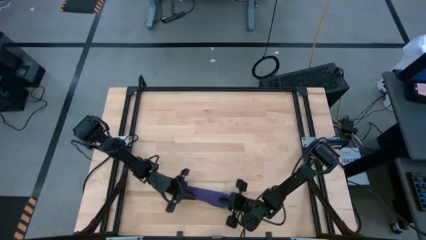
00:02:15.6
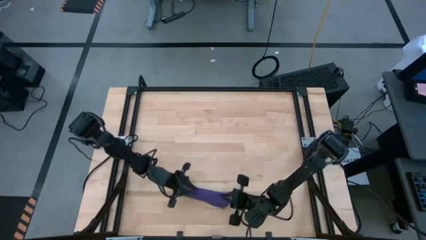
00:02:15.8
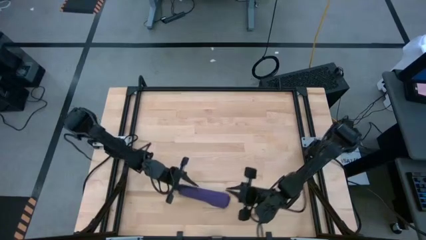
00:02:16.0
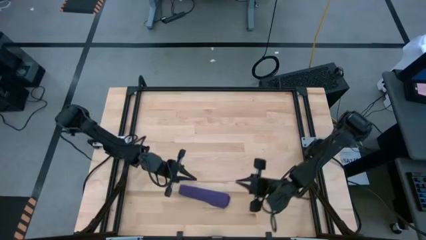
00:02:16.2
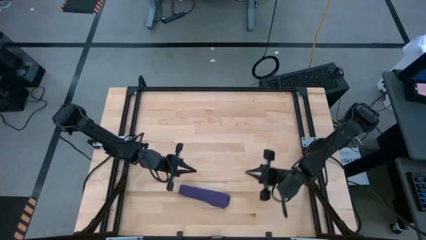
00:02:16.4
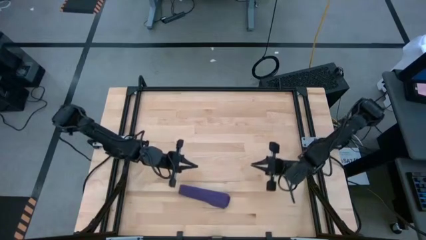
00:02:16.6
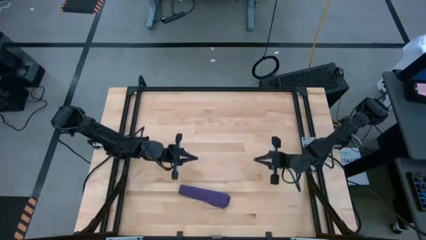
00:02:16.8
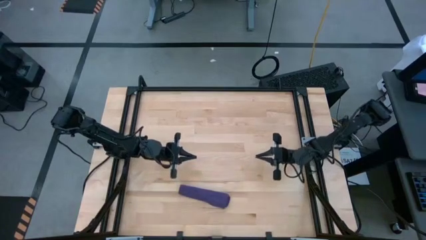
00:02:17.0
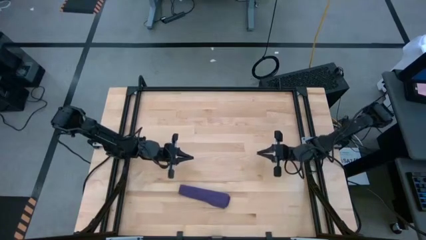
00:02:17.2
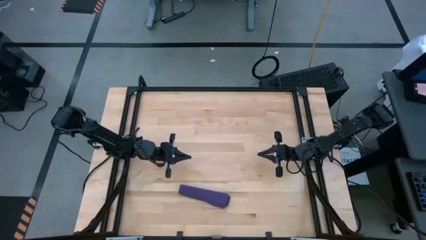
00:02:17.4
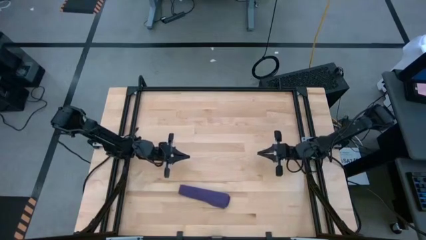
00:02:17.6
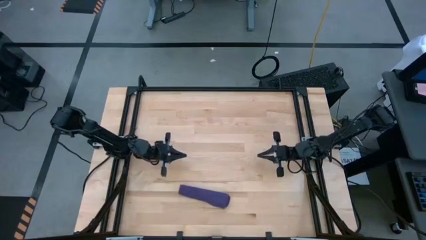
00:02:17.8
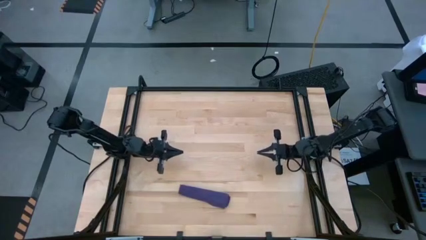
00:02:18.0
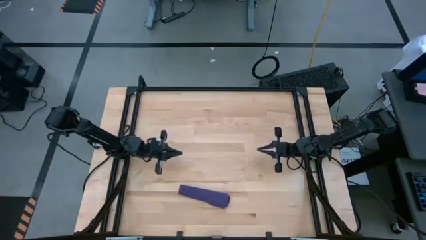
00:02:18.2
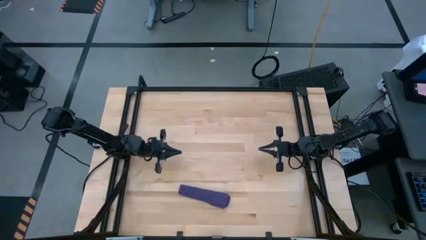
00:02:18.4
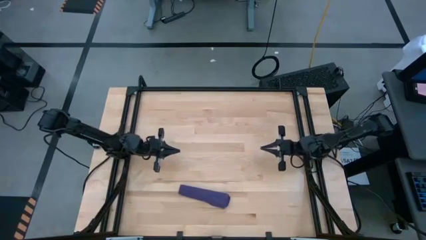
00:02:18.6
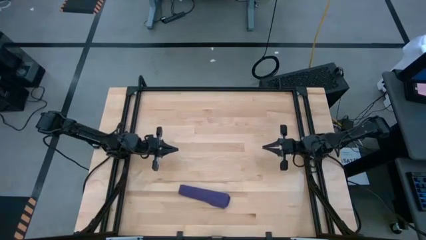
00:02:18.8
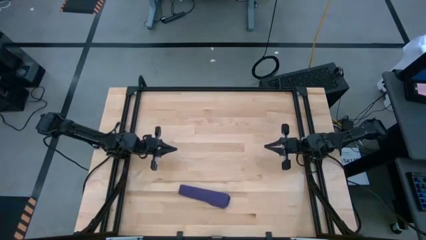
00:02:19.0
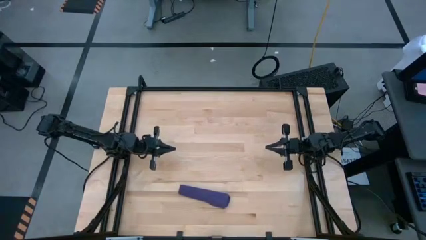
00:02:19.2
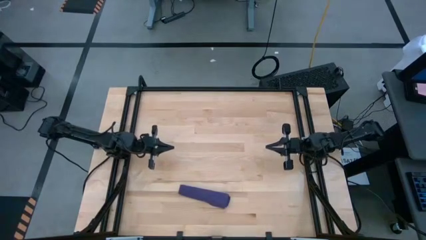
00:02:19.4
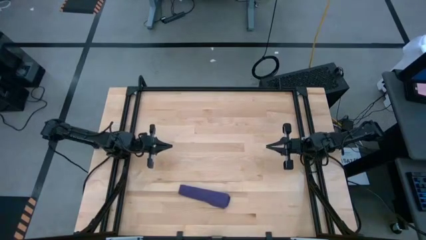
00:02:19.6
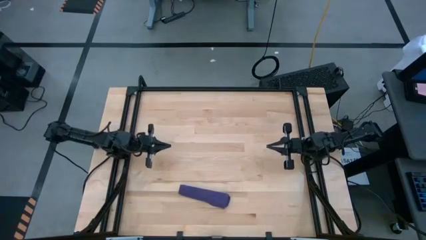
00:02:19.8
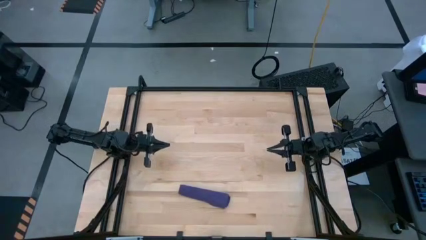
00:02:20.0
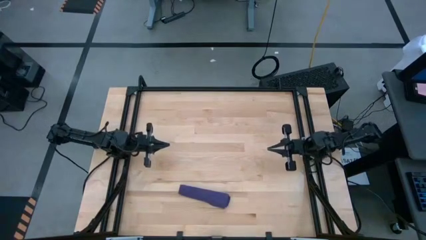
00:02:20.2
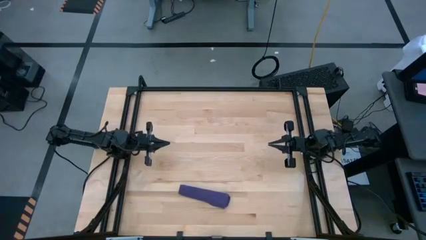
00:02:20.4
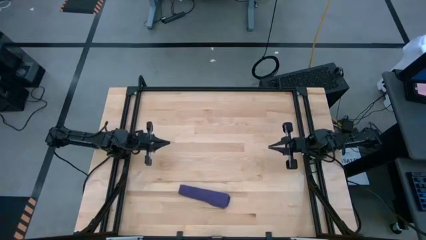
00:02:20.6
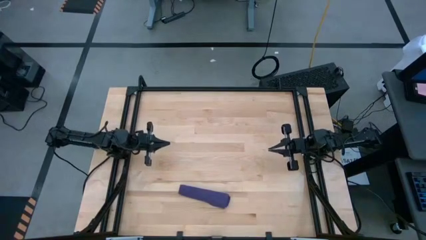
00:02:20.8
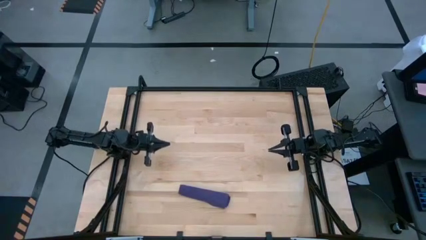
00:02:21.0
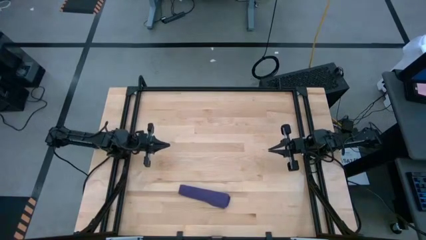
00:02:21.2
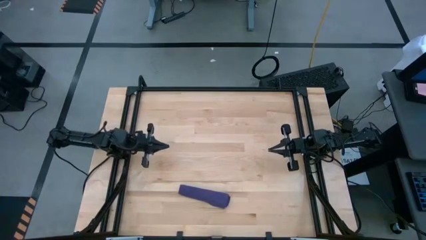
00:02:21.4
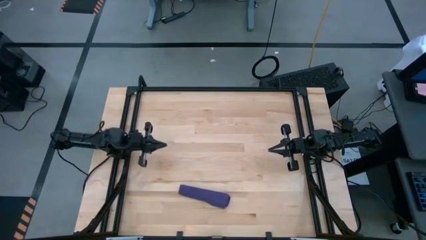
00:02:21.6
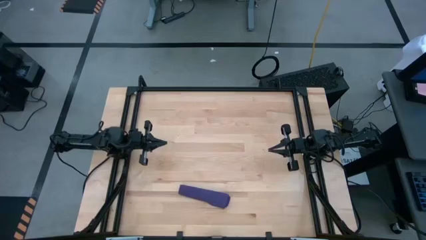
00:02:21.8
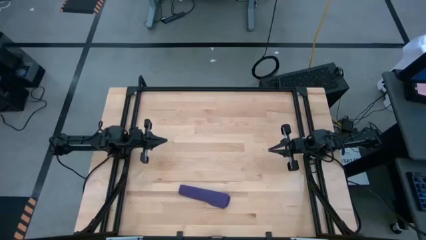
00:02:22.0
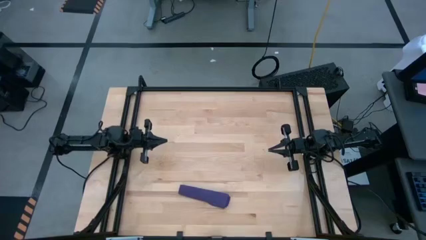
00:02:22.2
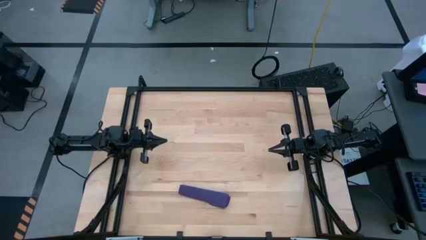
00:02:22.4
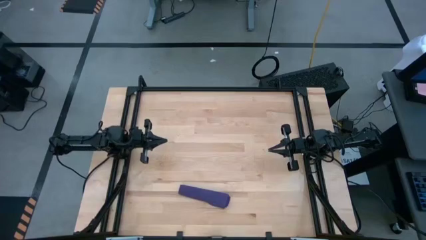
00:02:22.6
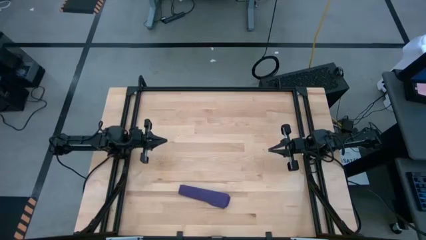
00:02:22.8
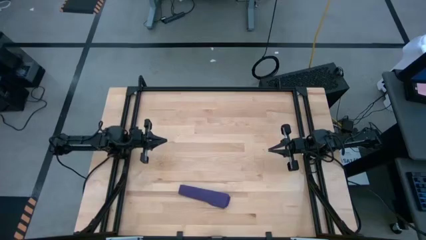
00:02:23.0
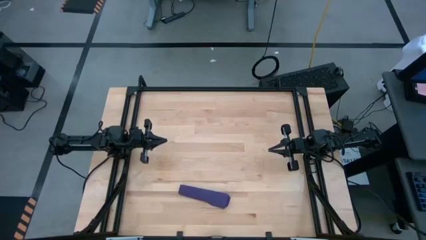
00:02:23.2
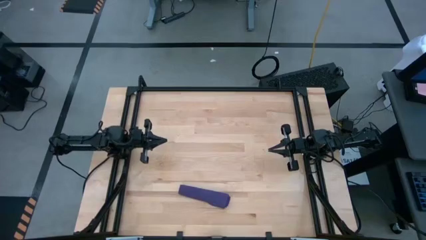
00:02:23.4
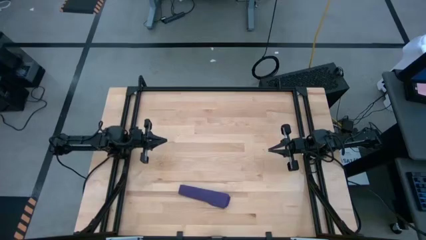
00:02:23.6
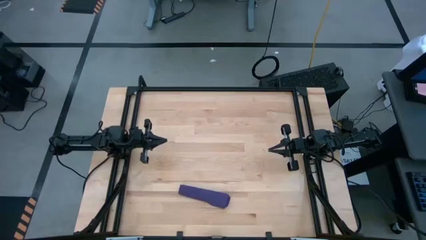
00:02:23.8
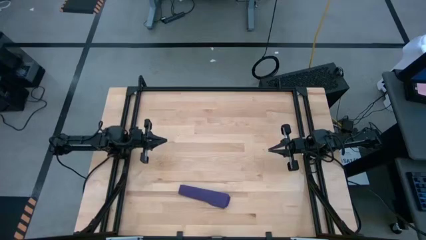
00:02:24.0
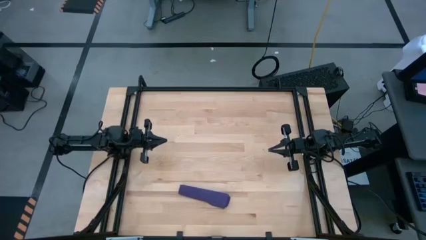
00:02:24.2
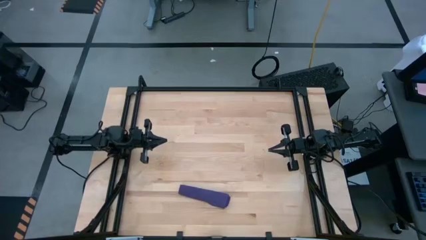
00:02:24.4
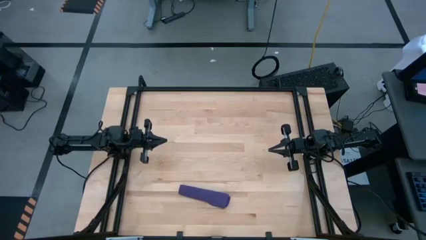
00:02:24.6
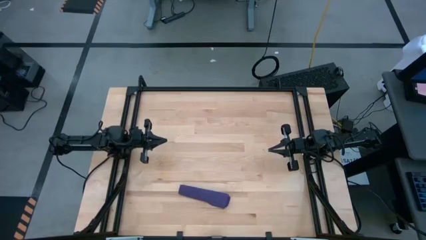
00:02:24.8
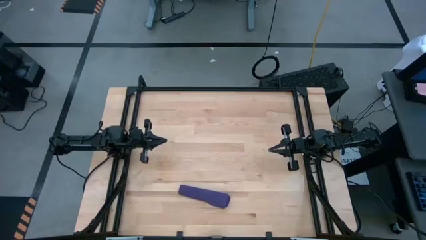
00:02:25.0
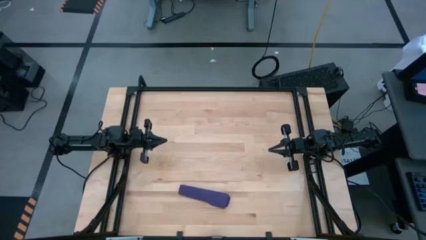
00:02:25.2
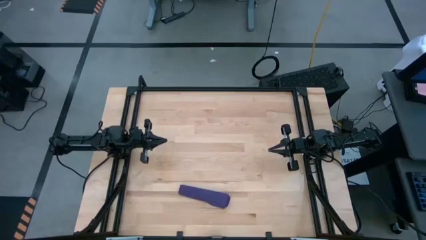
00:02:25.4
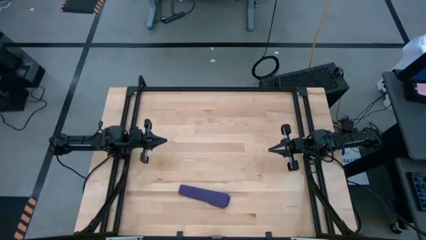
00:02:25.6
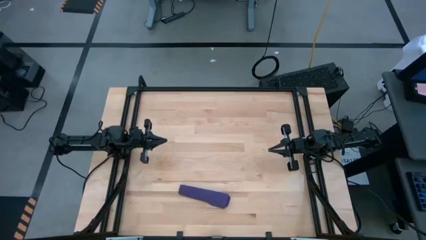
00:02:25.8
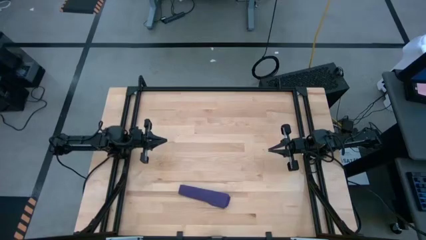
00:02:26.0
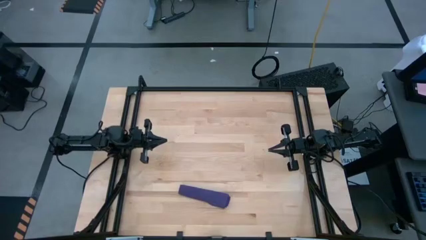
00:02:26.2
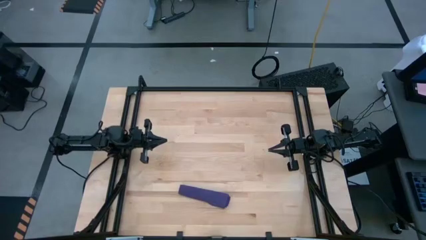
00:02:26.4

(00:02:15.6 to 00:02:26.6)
Task: Roll towel
Return to Home Position
